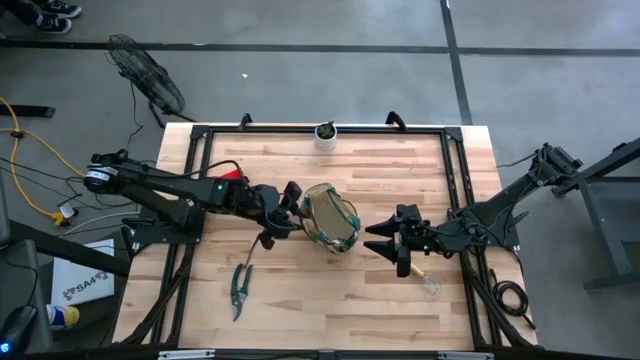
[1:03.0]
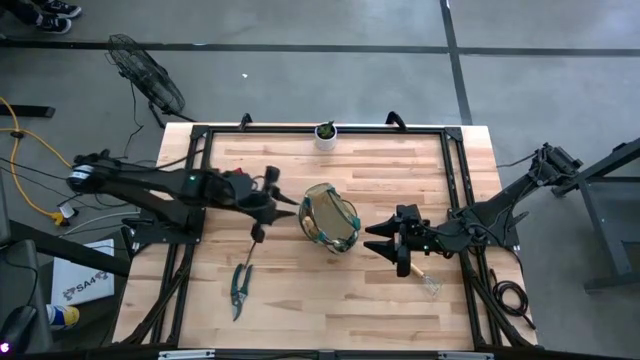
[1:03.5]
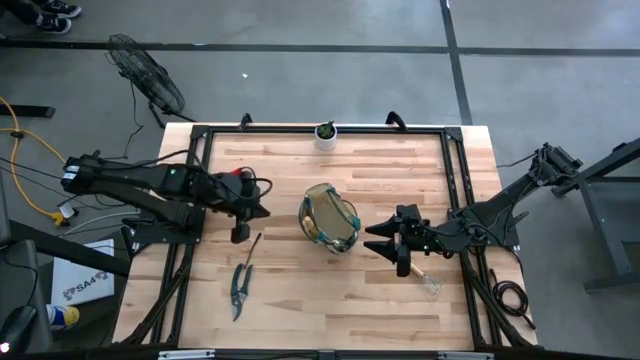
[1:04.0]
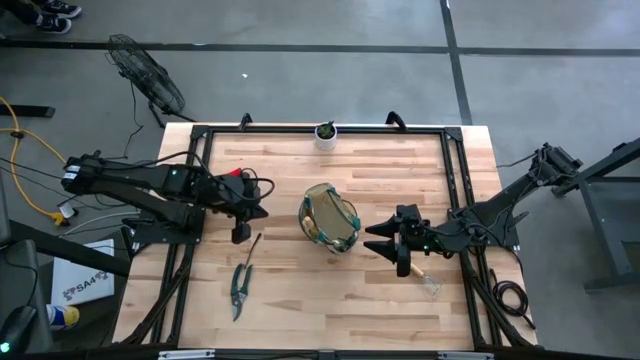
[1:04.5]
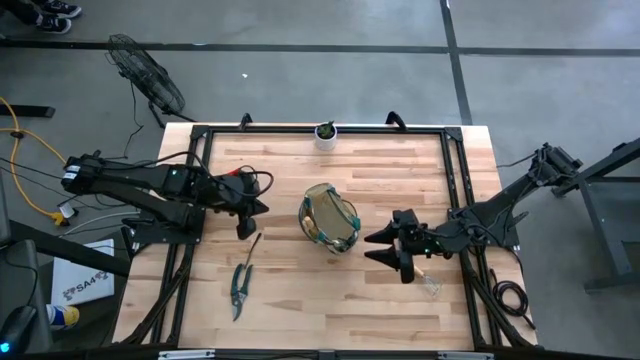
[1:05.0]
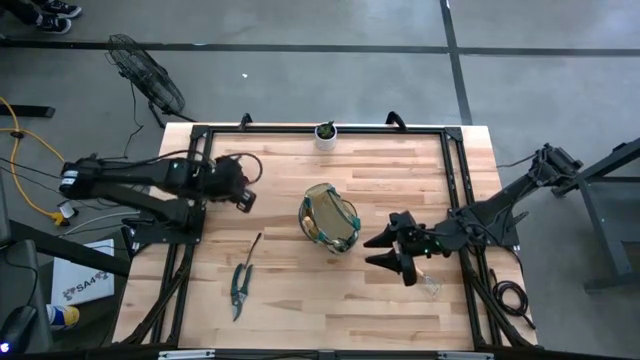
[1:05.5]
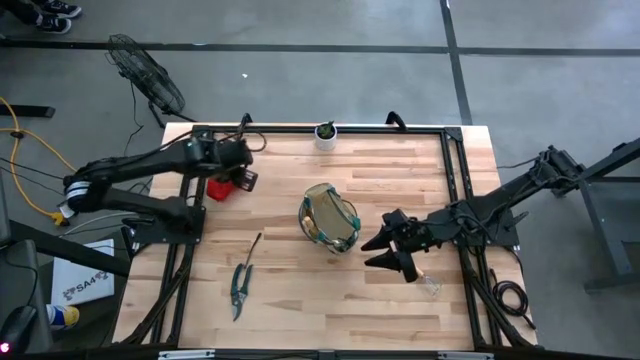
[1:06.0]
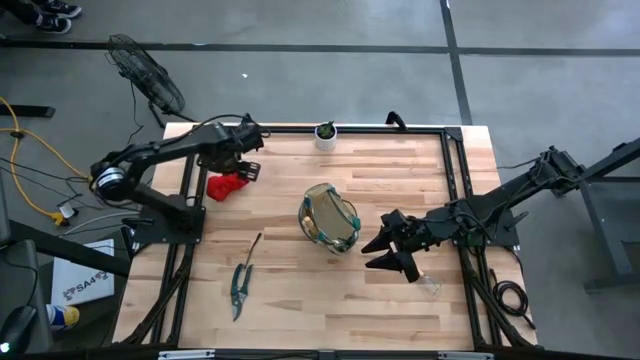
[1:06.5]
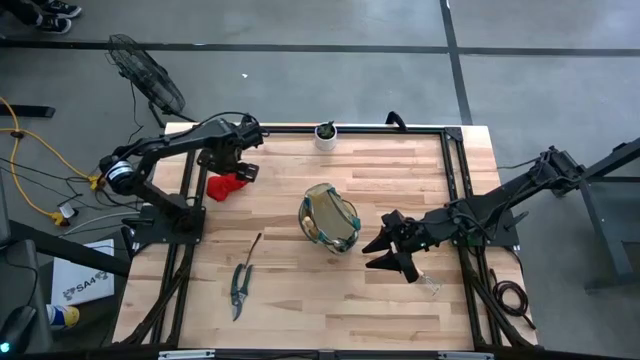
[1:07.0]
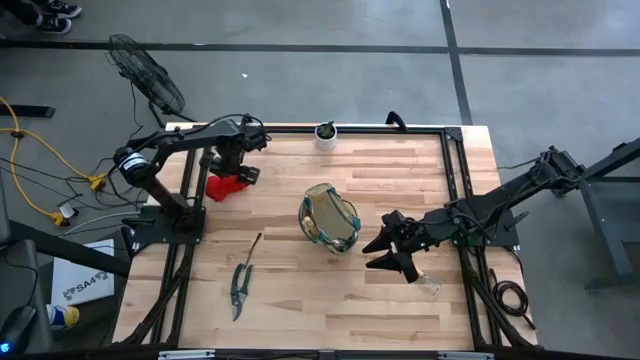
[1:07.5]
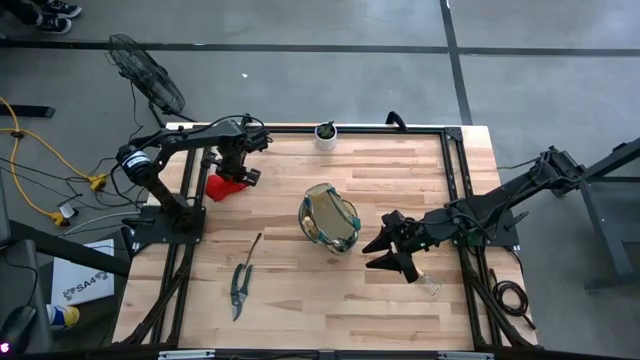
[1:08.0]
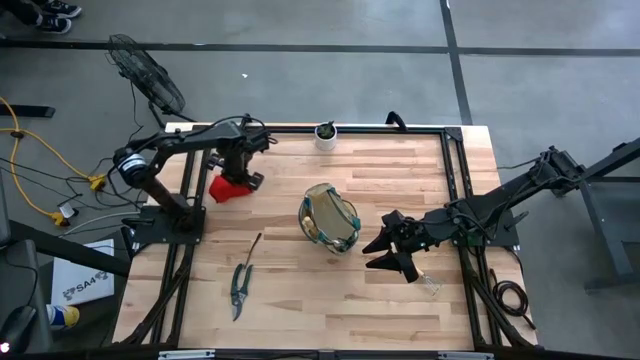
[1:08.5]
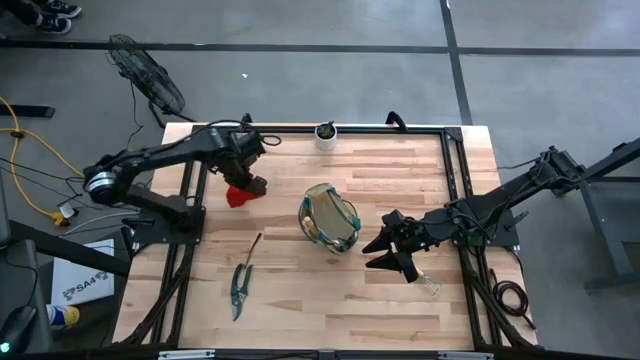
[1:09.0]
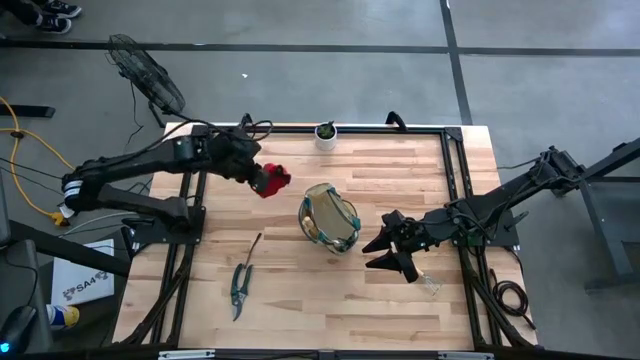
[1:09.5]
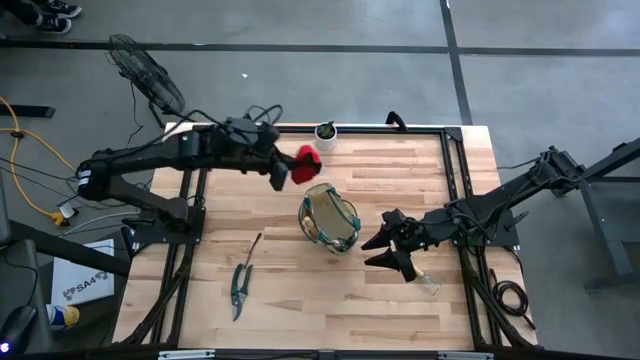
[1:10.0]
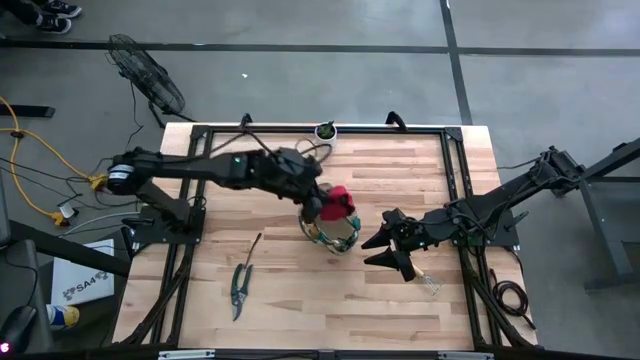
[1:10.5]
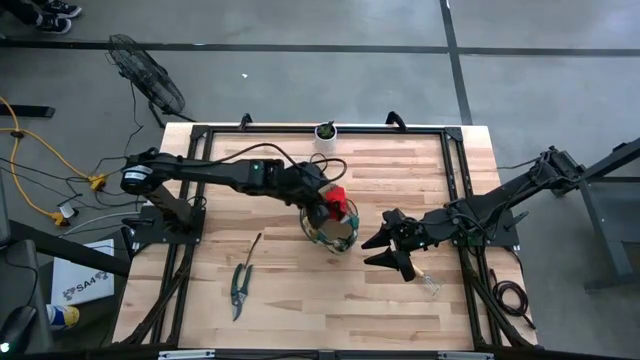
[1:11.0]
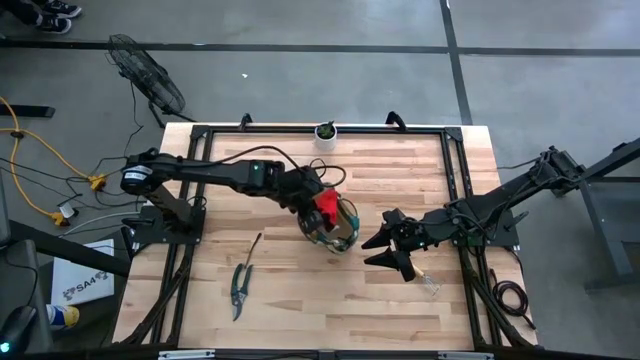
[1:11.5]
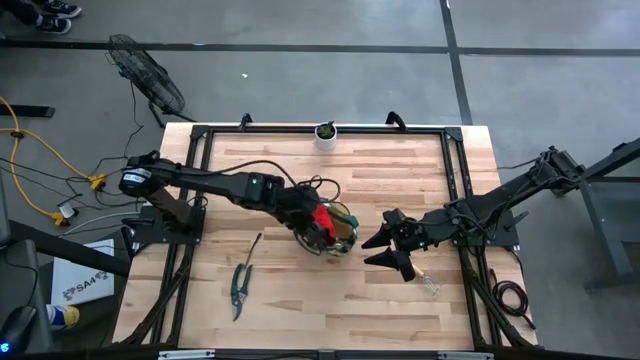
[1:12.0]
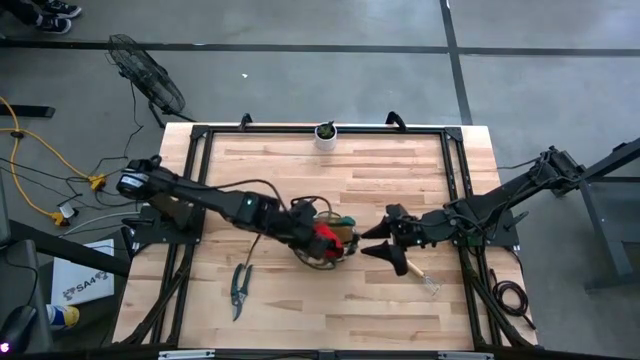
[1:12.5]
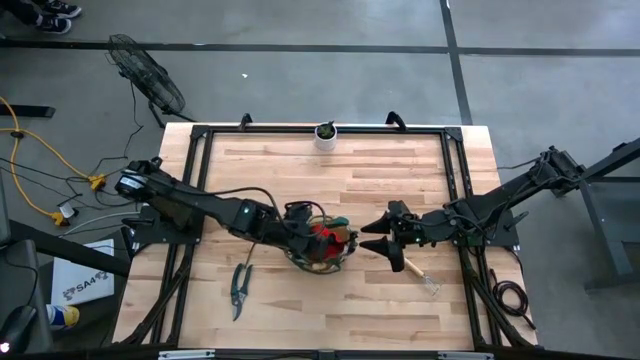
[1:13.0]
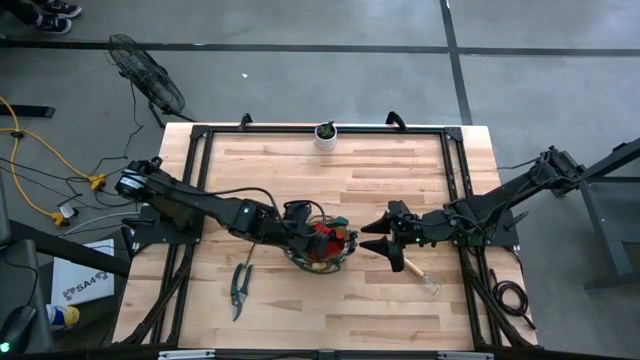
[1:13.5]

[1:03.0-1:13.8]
Task: Pick & Place Garden tools in Gardening bag
Put the red gloves into the gardening bag

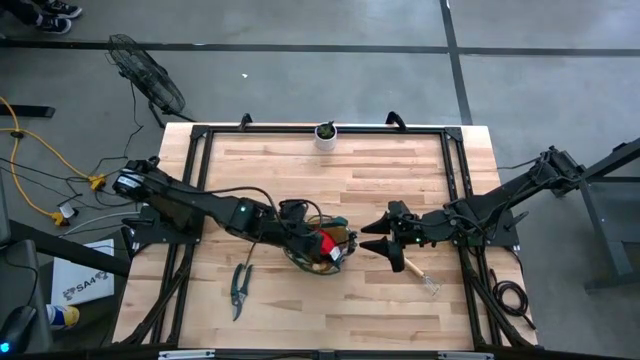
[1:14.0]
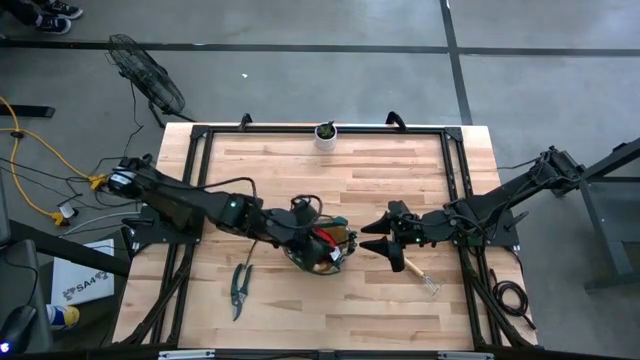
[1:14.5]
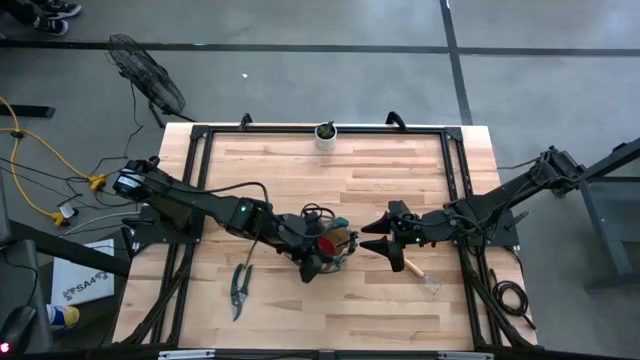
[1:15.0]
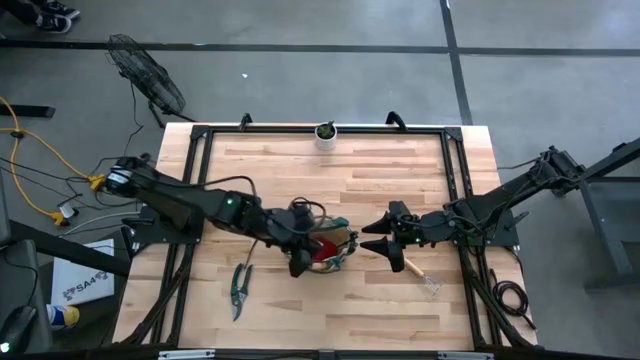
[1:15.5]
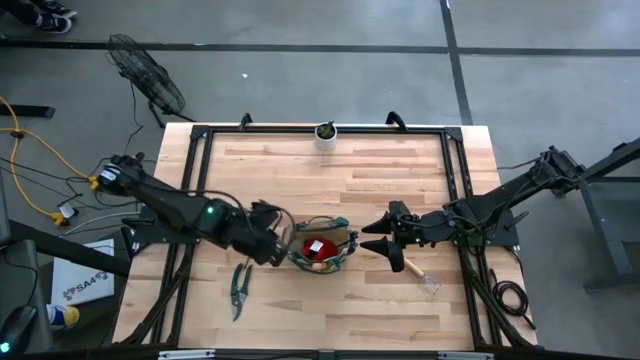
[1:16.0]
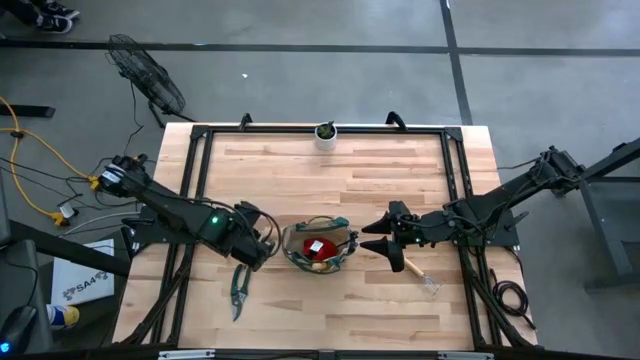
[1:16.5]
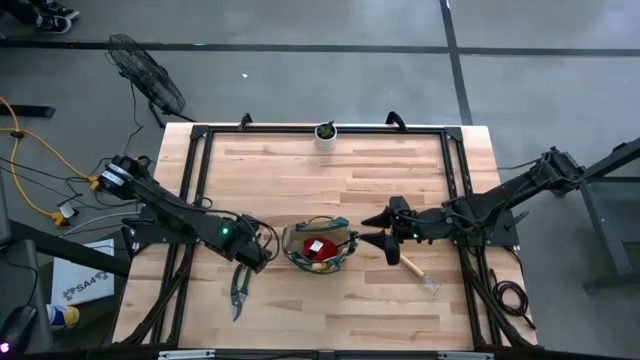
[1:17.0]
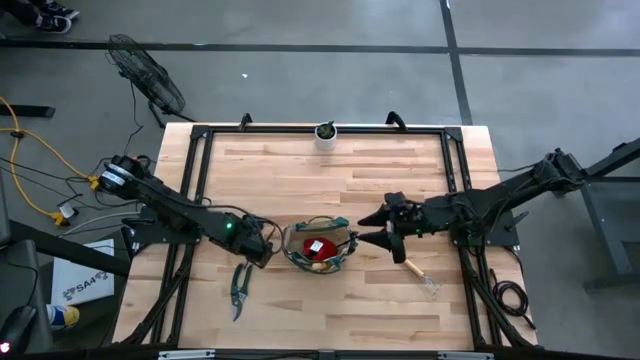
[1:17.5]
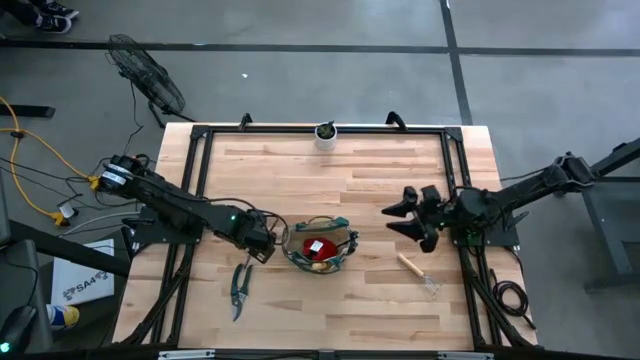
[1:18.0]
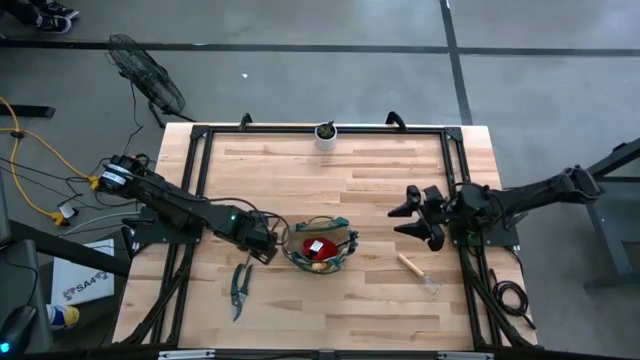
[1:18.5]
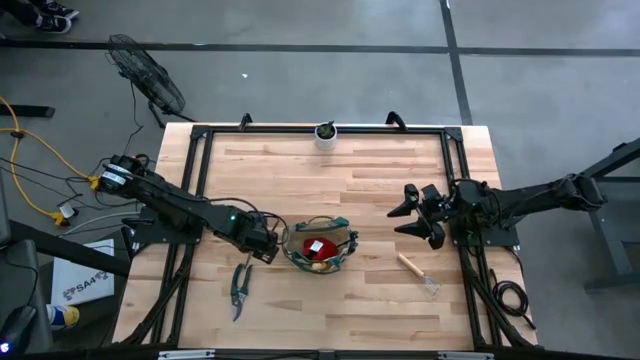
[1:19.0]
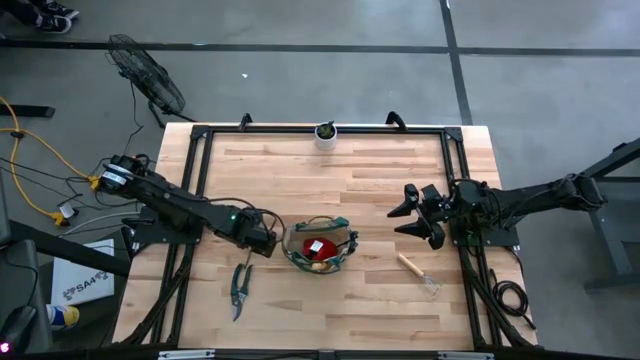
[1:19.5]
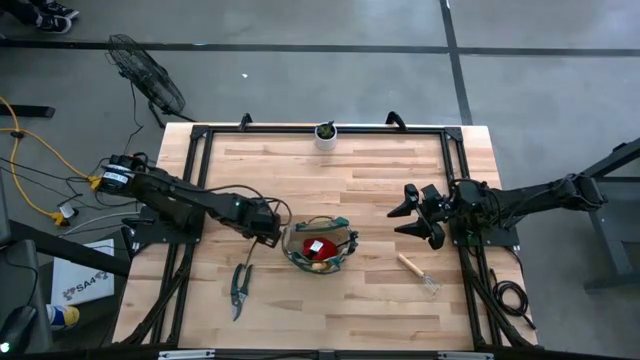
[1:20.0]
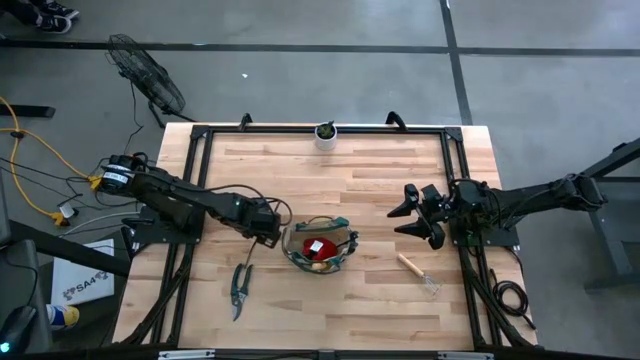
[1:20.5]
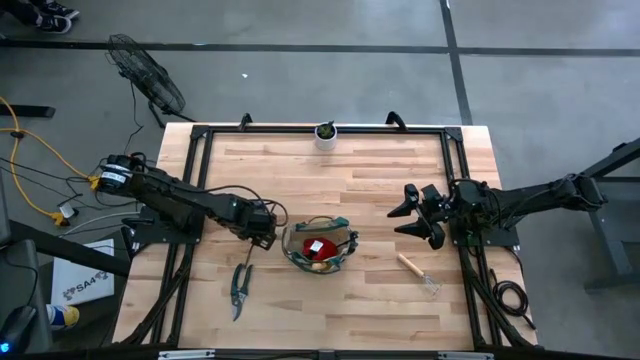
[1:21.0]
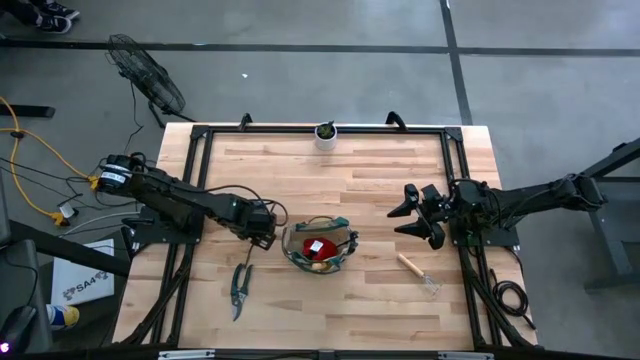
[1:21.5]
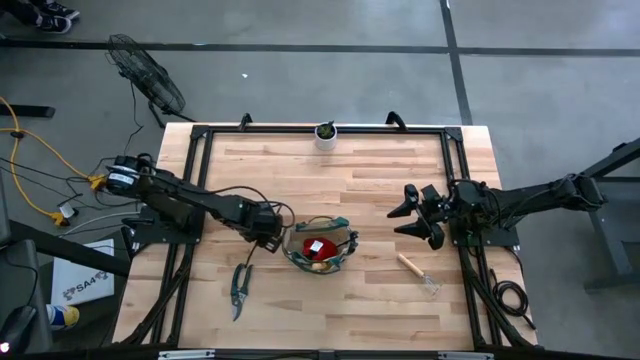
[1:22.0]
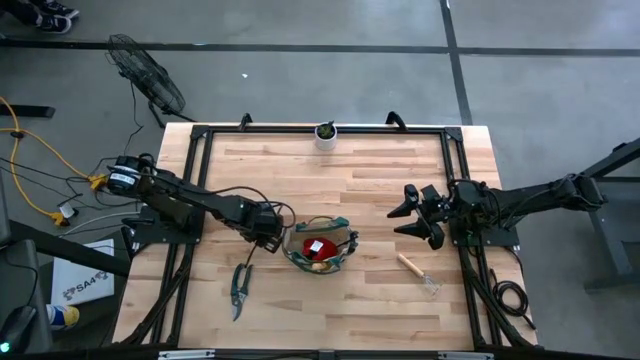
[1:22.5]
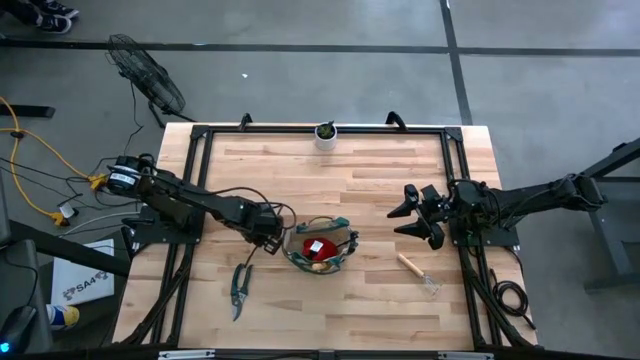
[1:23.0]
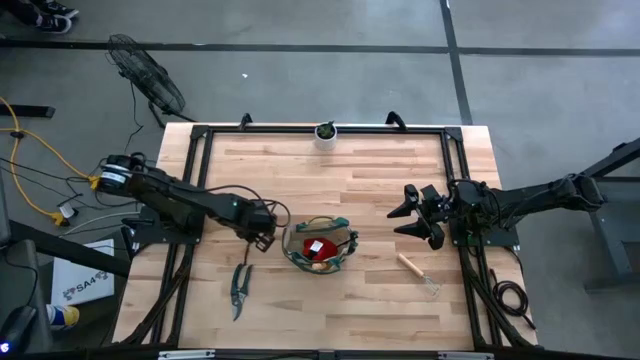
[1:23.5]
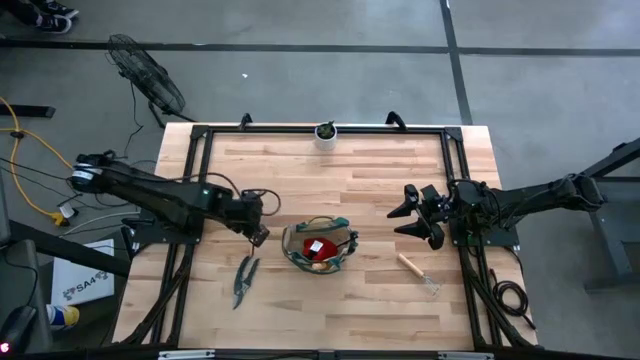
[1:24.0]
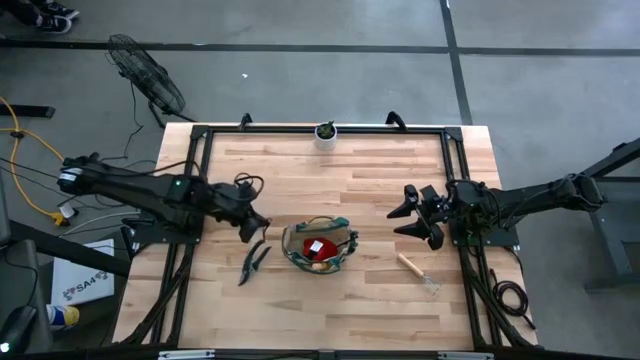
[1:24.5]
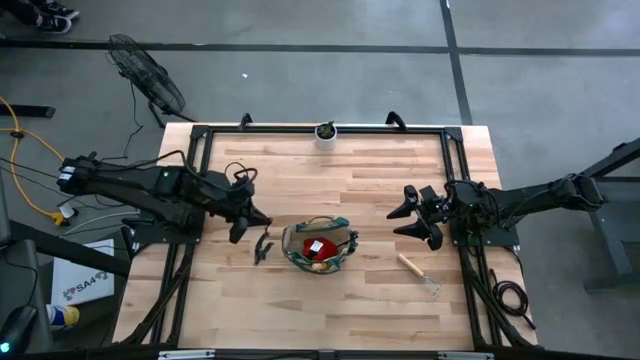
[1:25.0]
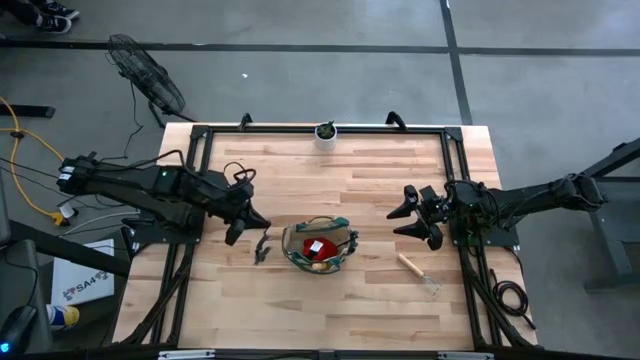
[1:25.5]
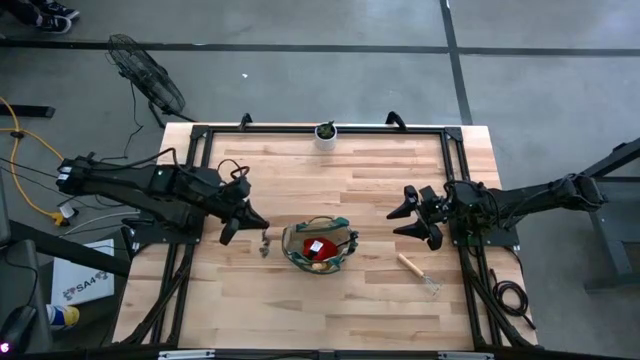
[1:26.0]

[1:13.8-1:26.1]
Put the green shear scissors into the gardening bag
